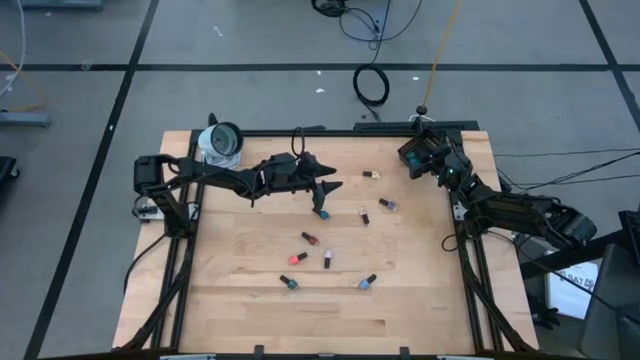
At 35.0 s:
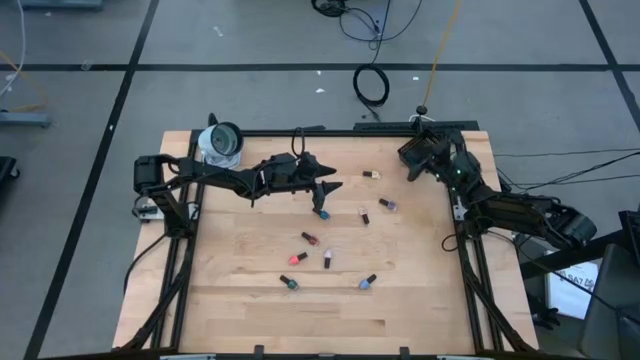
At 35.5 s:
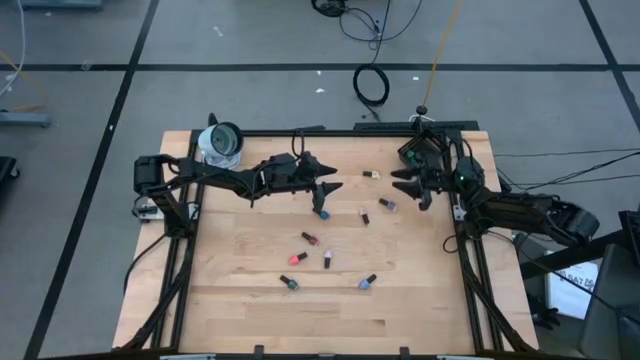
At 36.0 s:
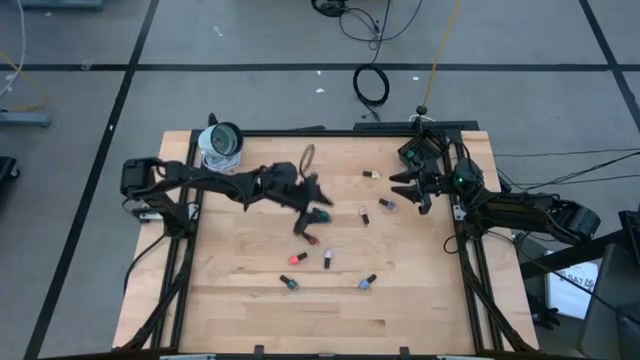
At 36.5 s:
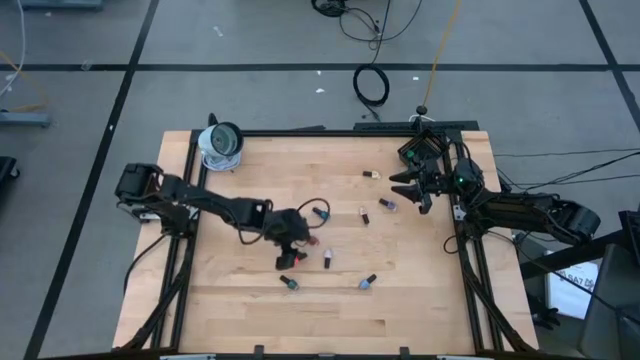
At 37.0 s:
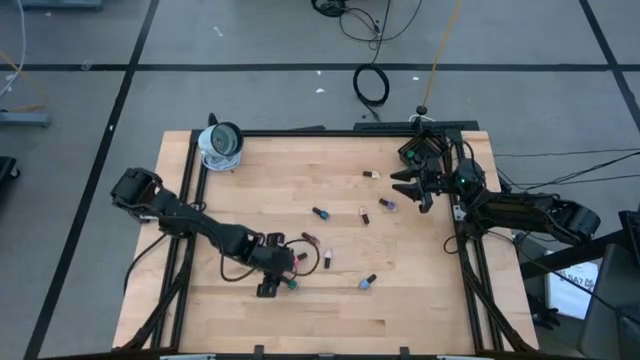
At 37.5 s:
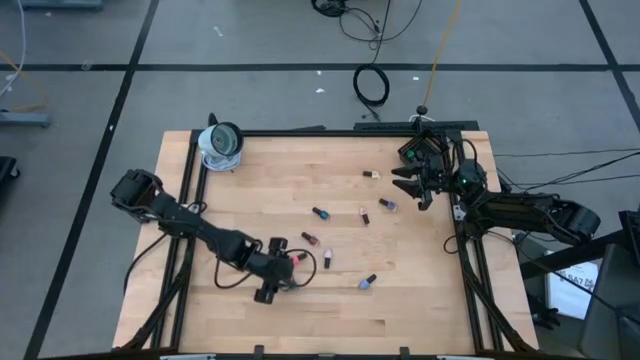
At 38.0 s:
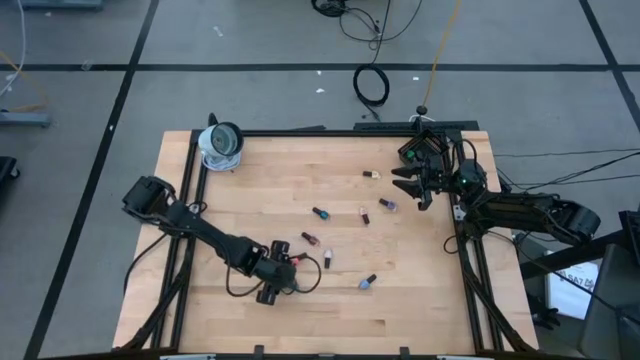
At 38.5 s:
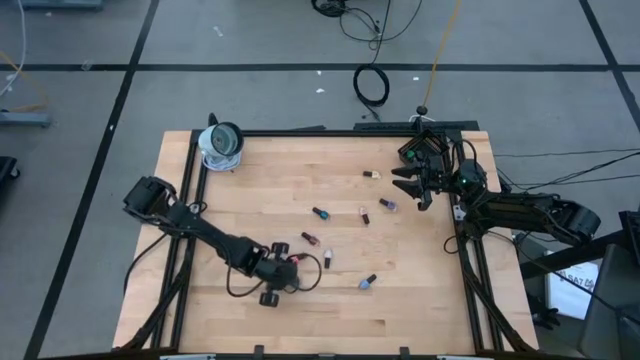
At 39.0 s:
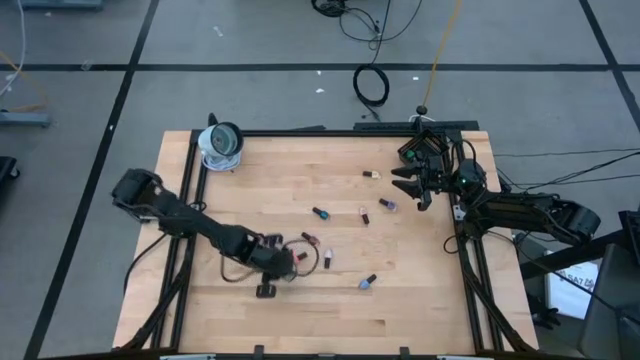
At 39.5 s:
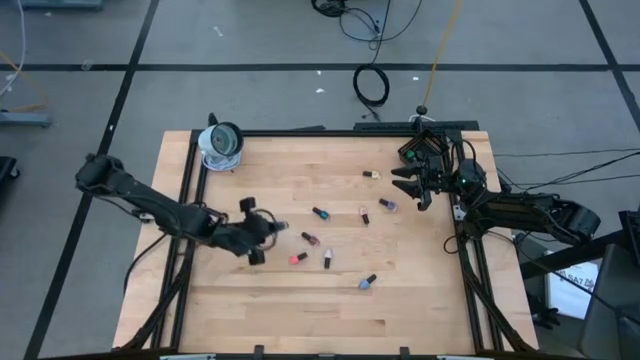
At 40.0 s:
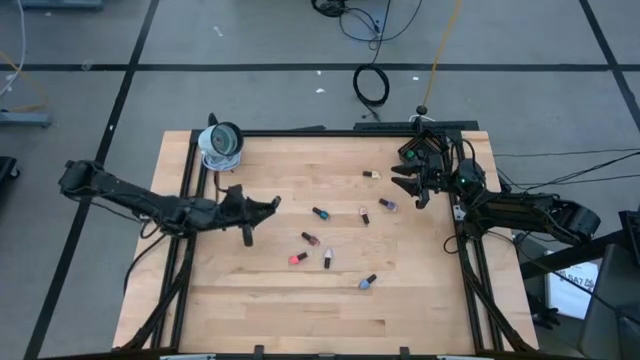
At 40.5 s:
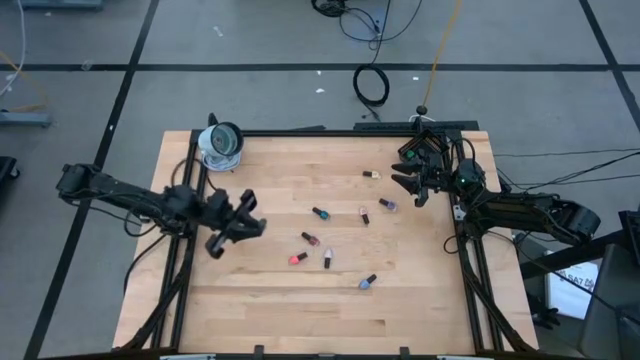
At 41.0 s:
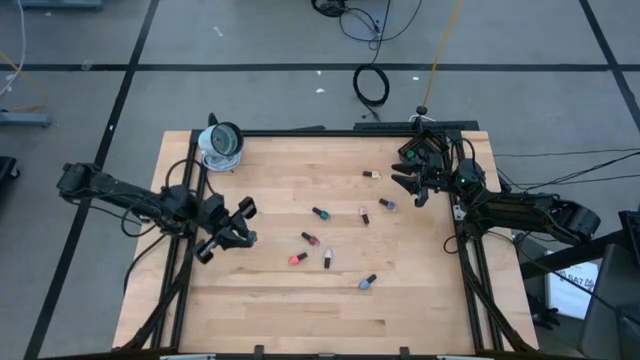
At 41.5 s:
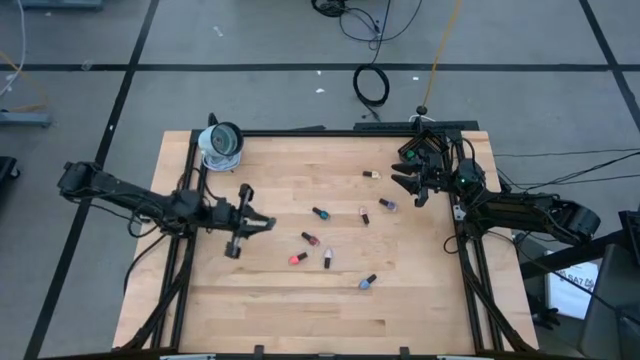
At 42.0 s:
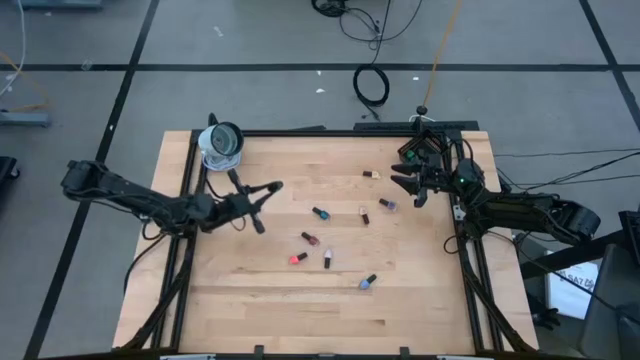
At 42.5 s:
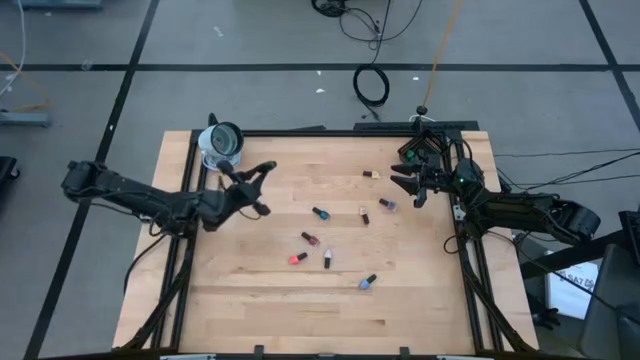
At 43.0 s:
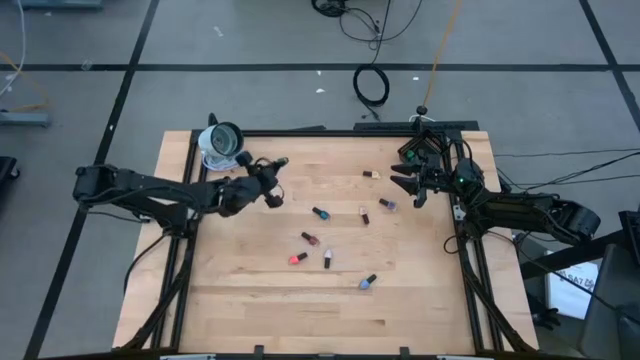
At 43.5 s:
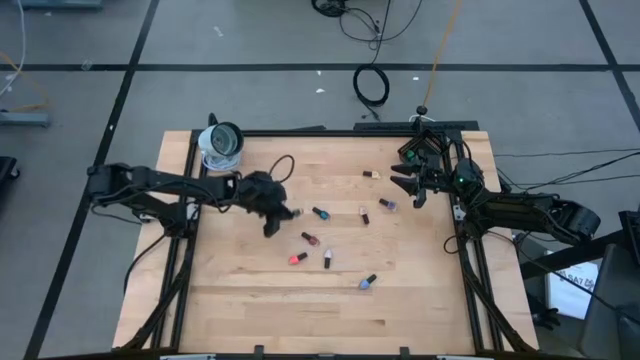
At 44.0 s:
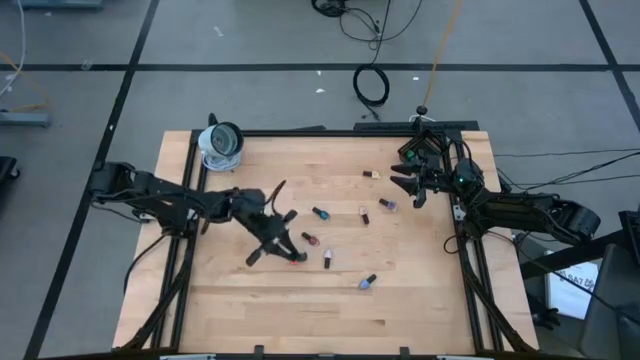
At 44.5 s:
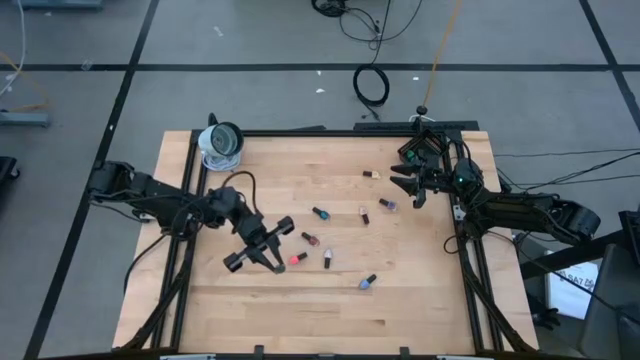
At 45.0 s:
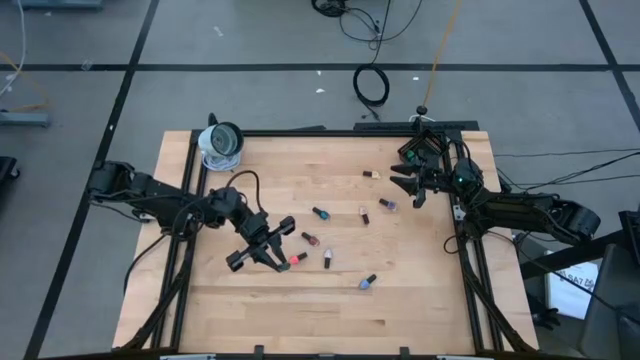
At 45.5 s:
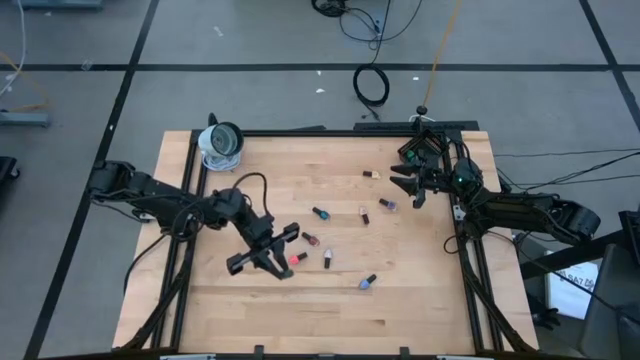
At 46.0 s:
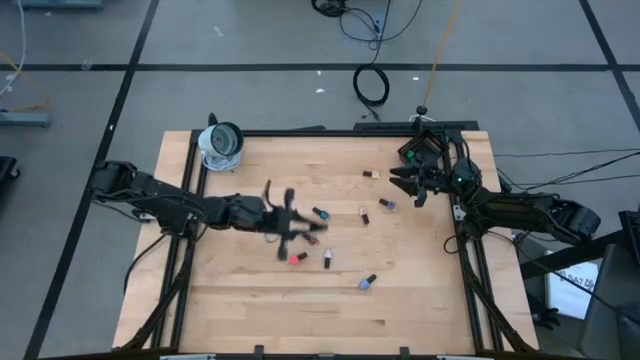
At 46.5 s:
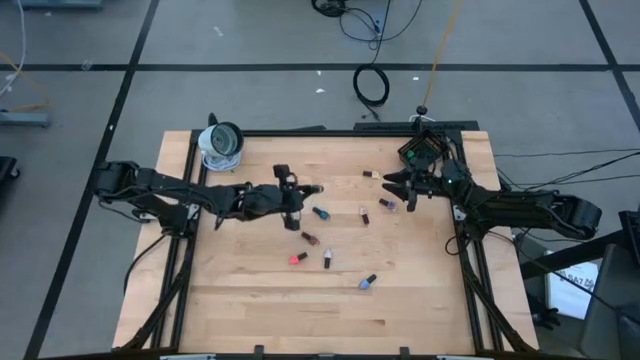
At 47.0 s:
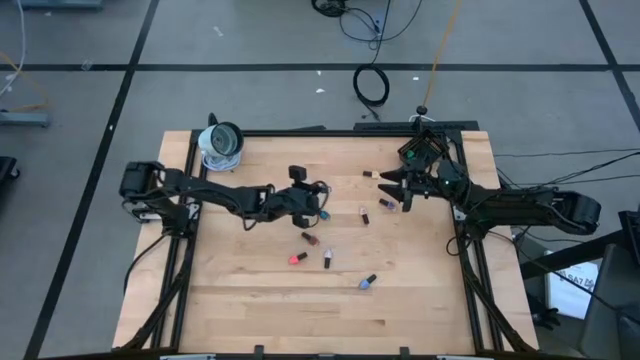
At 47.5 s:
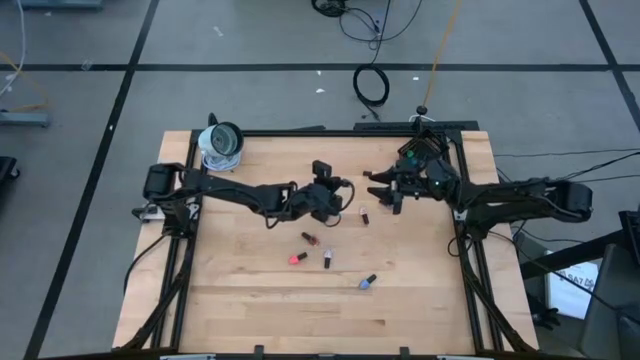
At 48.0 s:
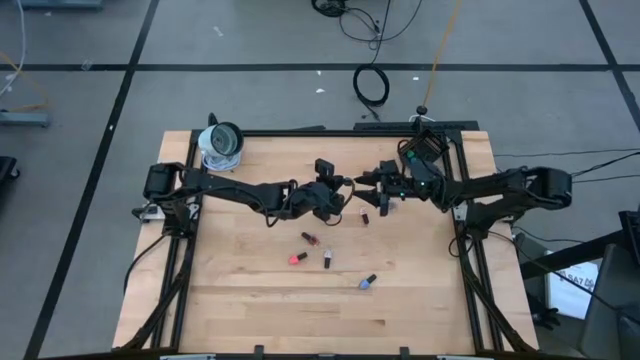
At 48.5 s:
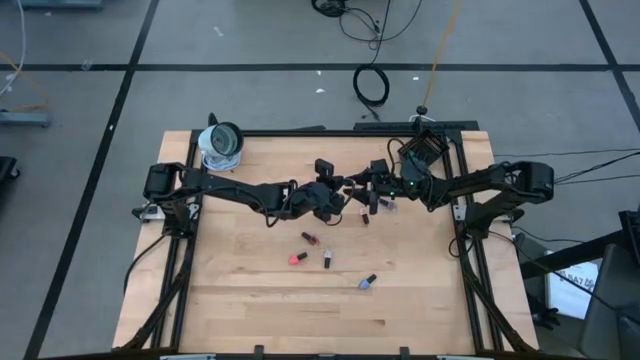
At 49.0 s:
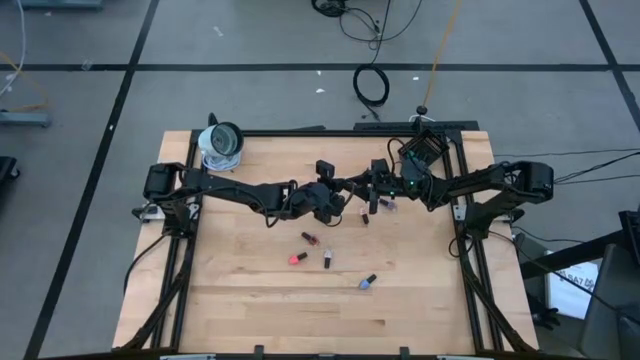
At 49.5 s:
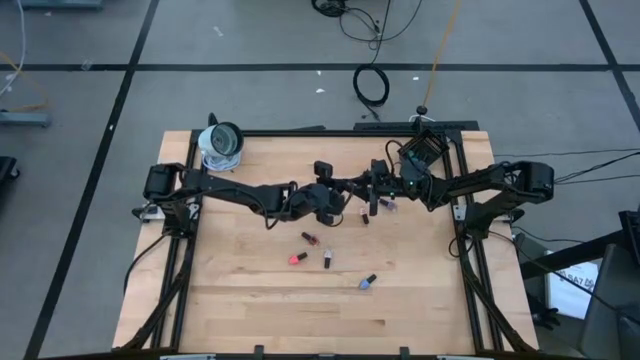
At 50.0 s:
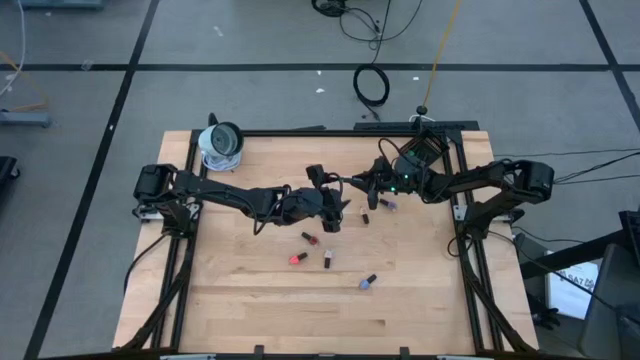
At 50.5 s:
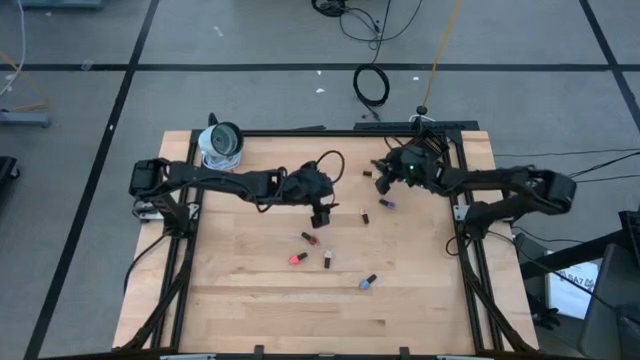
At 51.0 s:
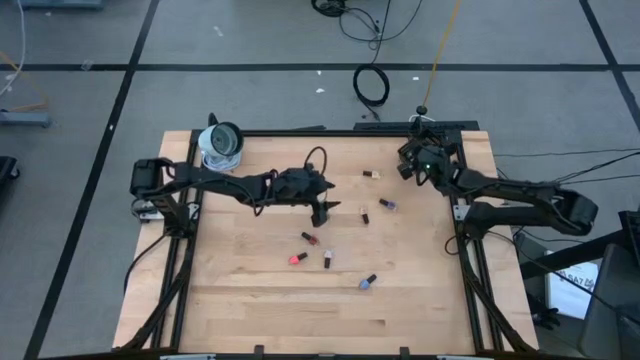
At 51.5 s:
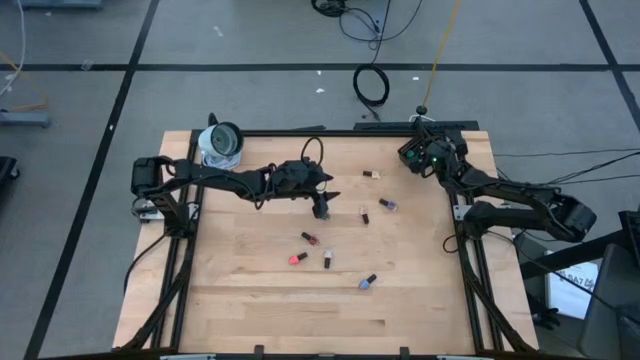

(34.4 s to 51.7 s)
Task: Pick & Place Nail Polish
Put the silver green nail polish into the black bin

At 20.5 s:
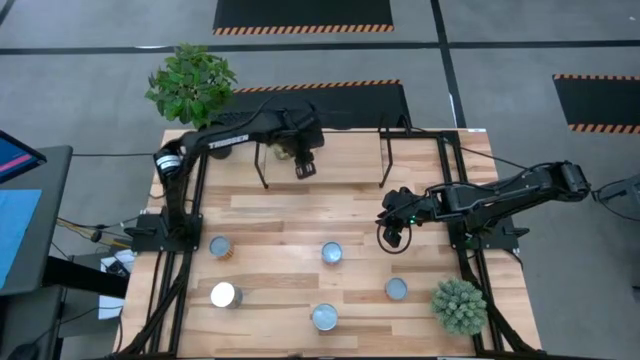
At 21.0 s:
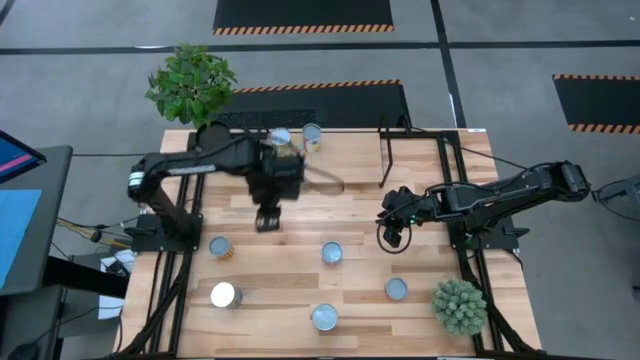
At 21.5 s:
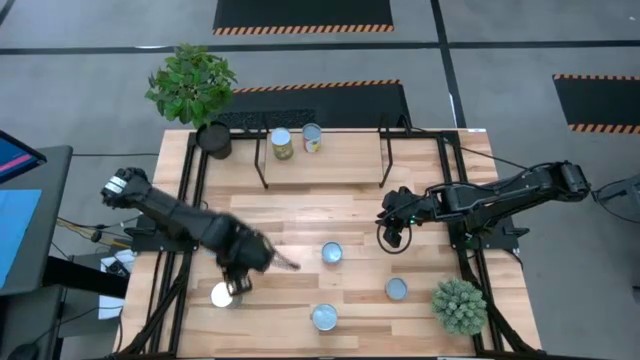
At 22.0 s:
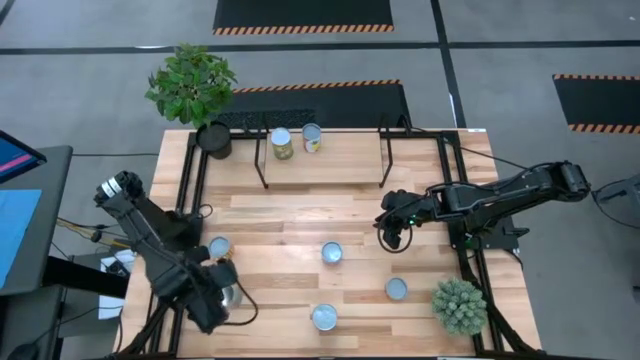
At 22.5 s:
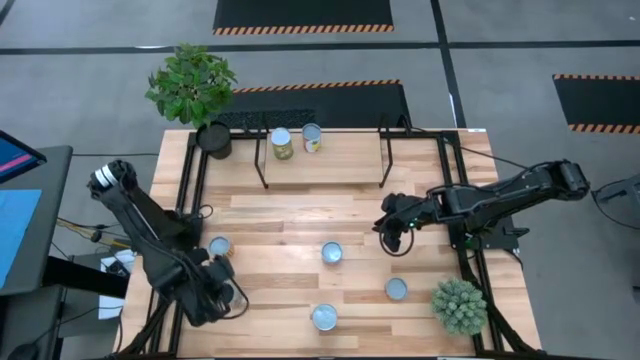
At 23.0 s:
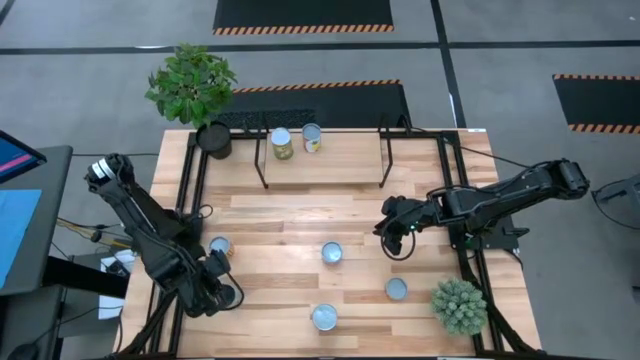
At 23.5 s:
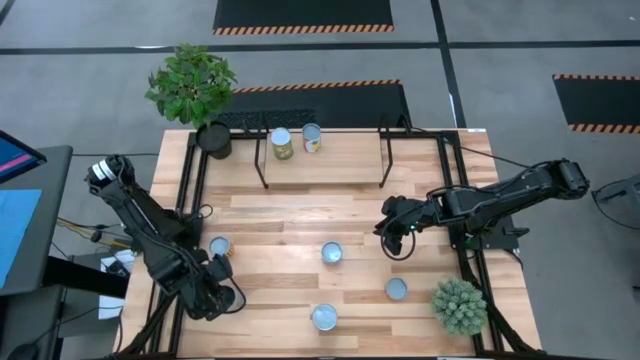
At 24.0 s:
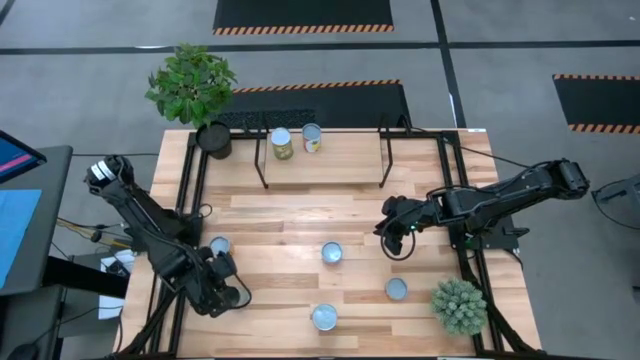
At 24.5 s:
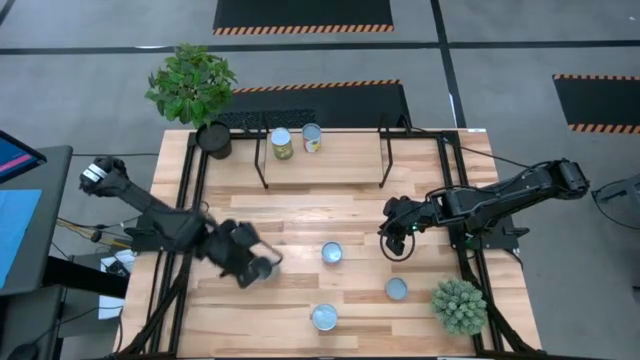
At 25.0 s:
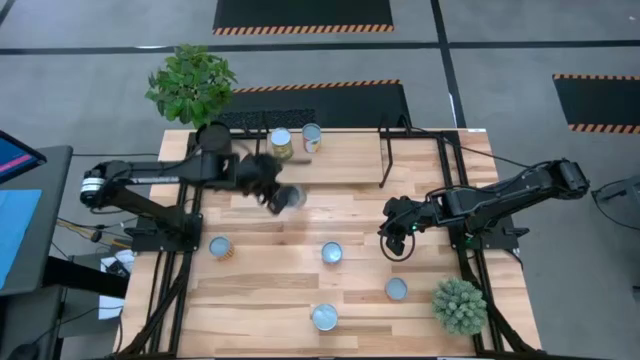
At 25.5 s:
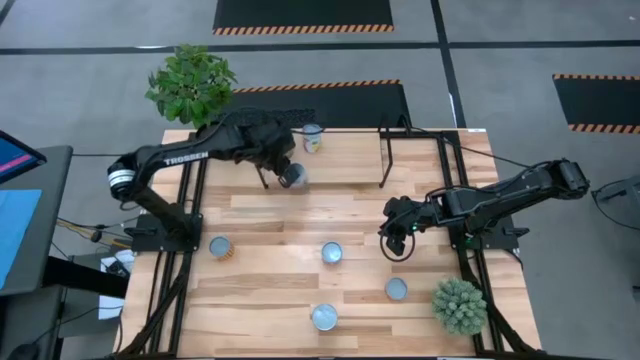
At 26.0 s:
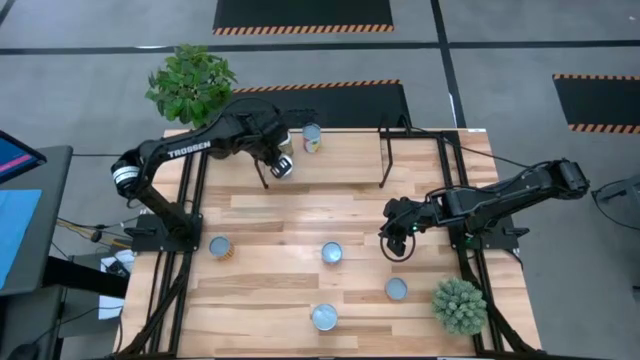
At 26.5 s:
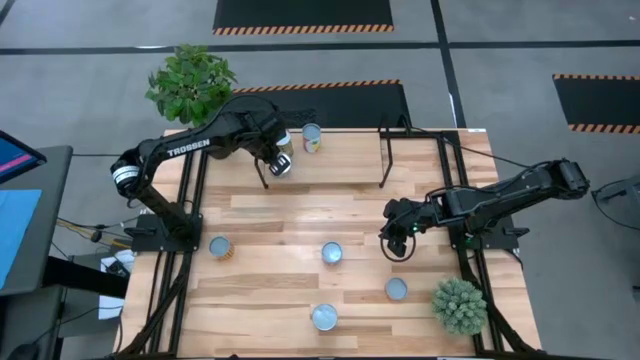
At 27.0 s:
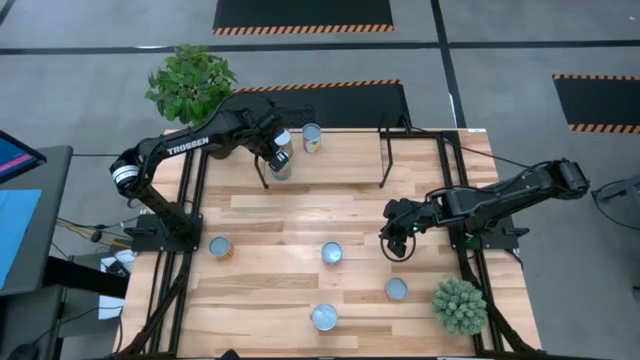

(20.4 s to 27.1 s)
Task: Pick and place cans onto a shelf
Put the canned tomatoes can on the shelf
